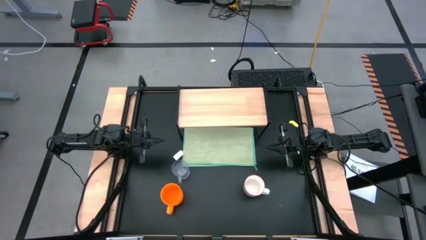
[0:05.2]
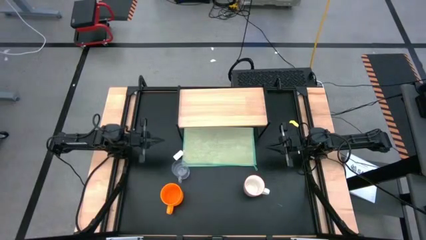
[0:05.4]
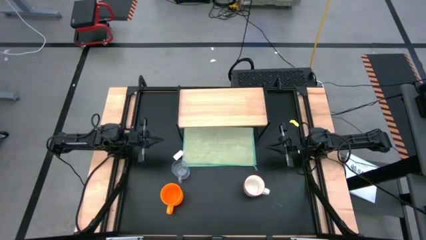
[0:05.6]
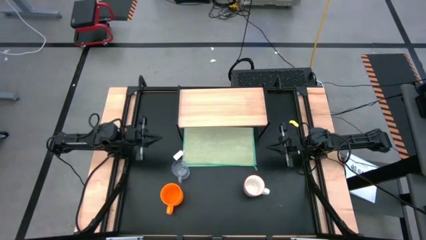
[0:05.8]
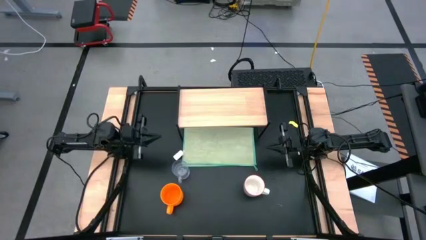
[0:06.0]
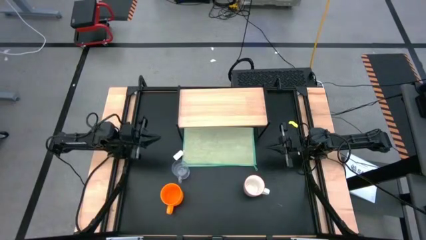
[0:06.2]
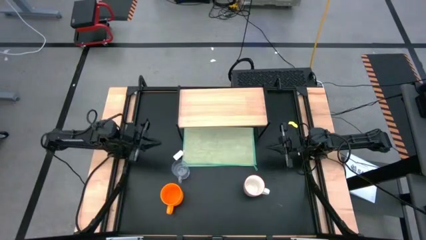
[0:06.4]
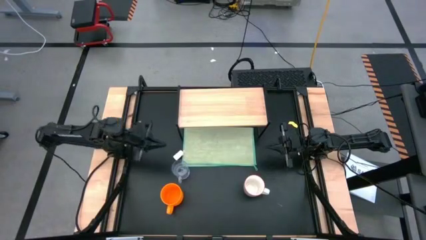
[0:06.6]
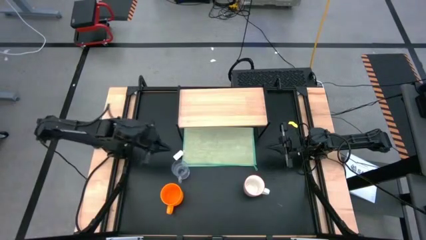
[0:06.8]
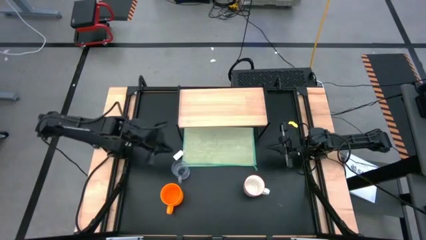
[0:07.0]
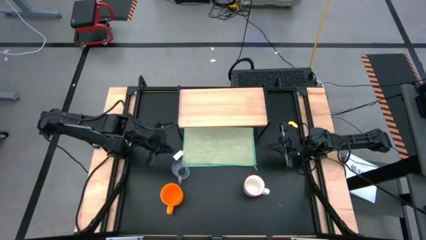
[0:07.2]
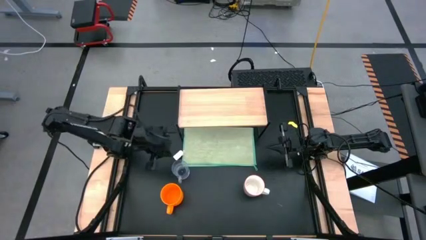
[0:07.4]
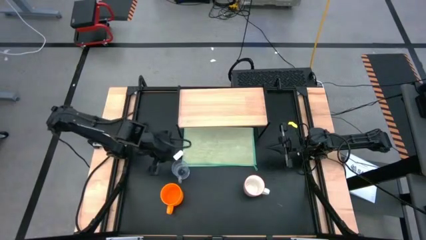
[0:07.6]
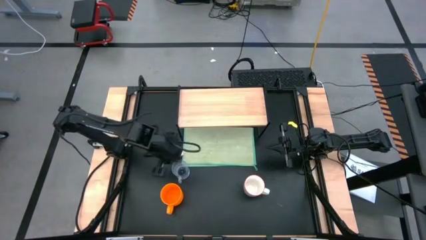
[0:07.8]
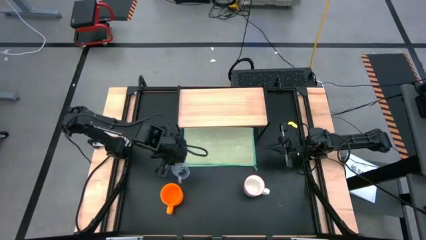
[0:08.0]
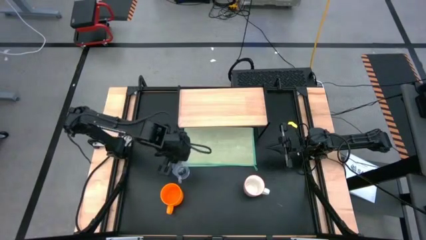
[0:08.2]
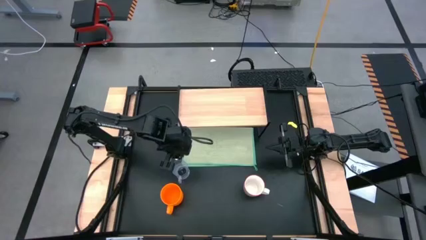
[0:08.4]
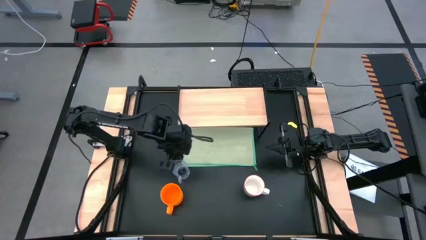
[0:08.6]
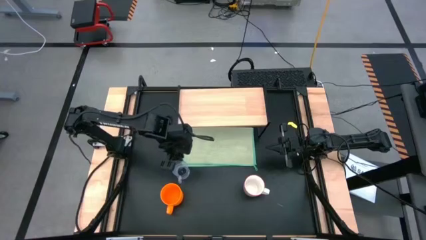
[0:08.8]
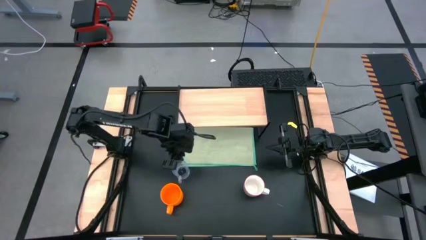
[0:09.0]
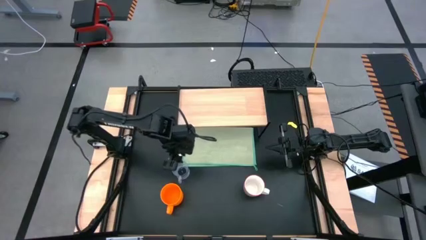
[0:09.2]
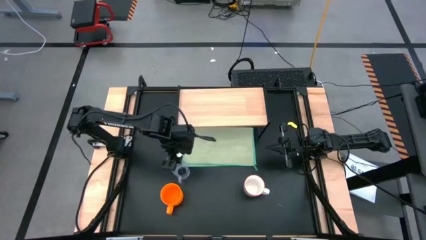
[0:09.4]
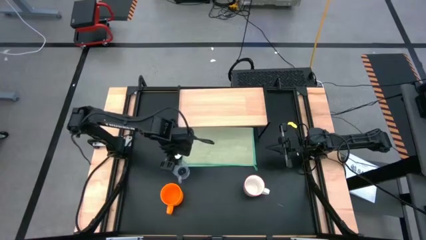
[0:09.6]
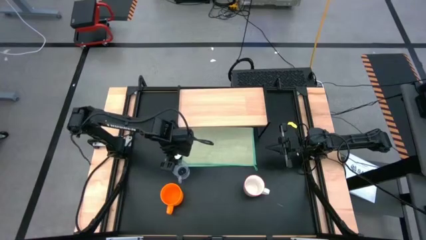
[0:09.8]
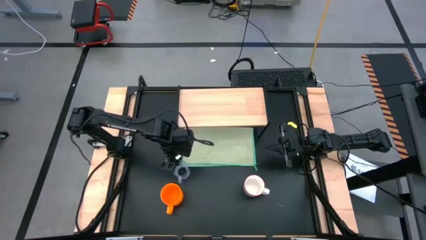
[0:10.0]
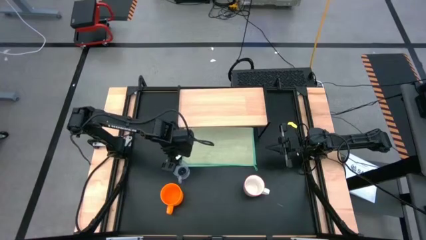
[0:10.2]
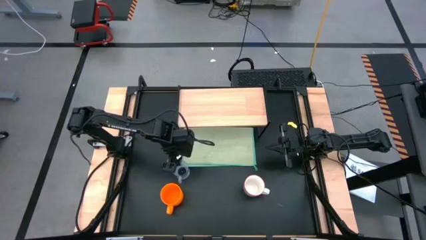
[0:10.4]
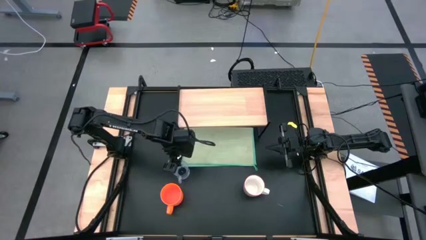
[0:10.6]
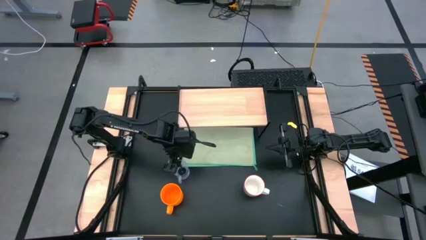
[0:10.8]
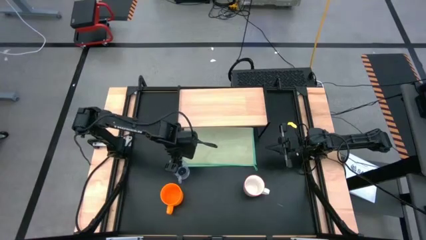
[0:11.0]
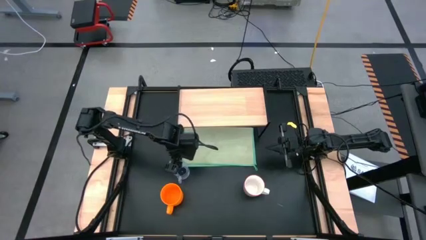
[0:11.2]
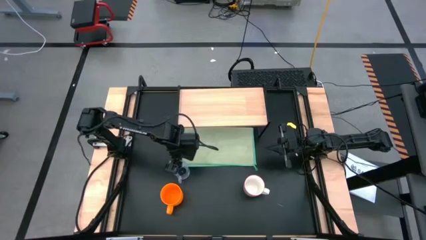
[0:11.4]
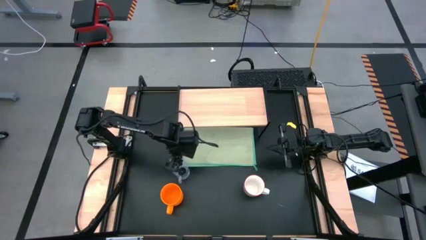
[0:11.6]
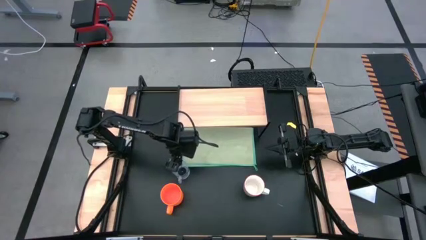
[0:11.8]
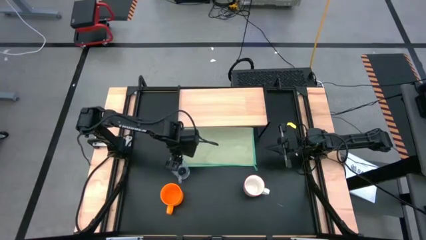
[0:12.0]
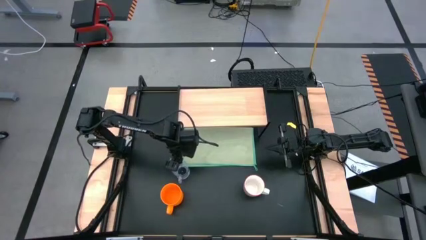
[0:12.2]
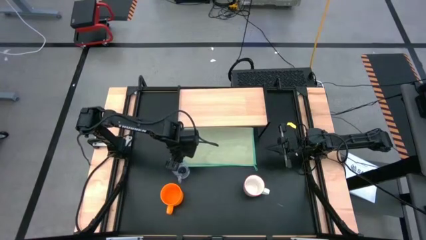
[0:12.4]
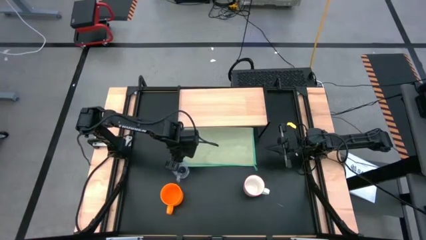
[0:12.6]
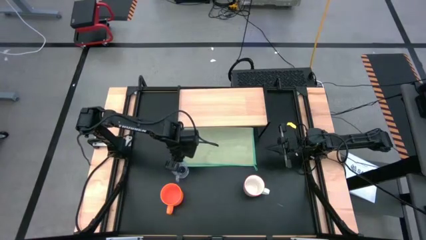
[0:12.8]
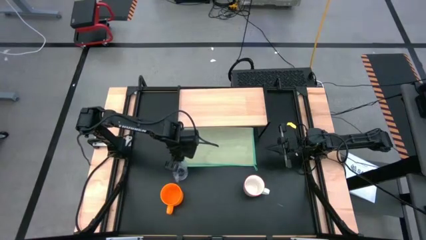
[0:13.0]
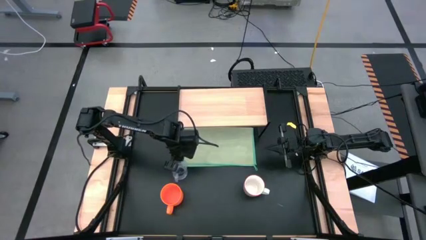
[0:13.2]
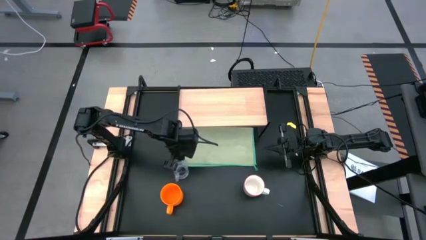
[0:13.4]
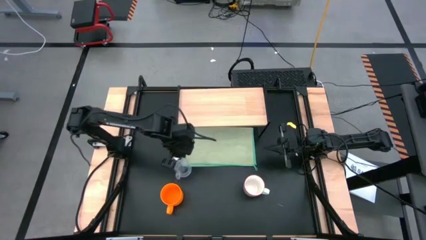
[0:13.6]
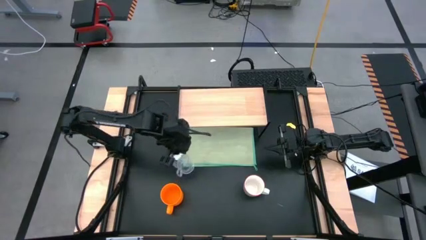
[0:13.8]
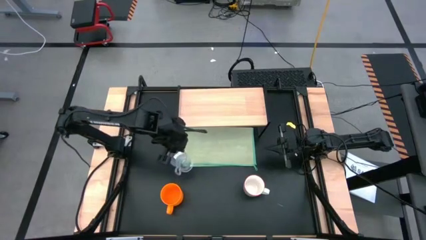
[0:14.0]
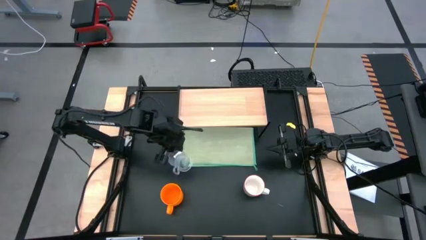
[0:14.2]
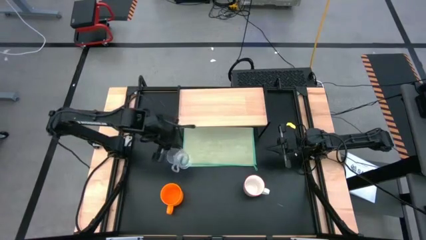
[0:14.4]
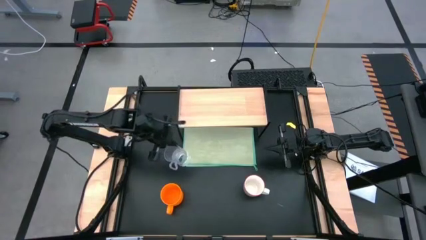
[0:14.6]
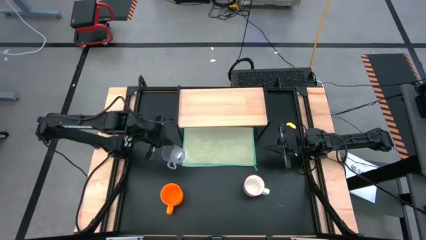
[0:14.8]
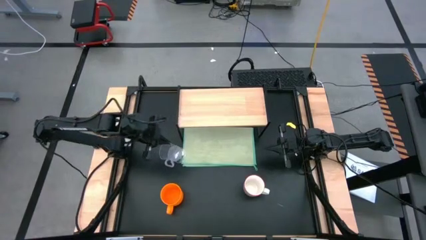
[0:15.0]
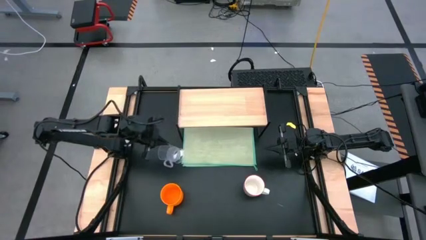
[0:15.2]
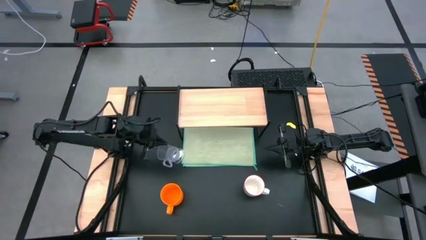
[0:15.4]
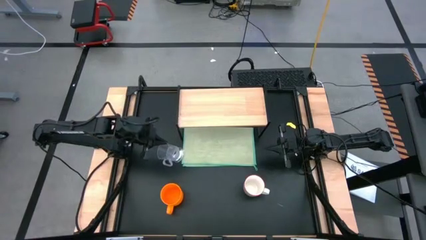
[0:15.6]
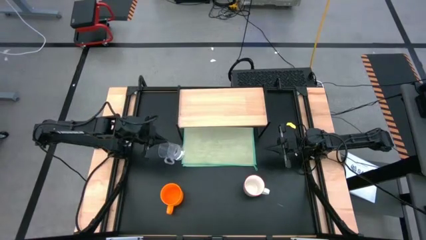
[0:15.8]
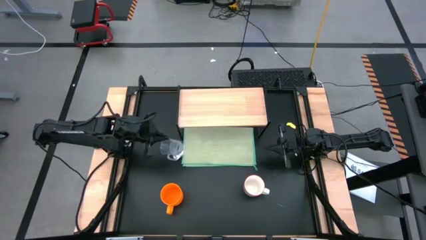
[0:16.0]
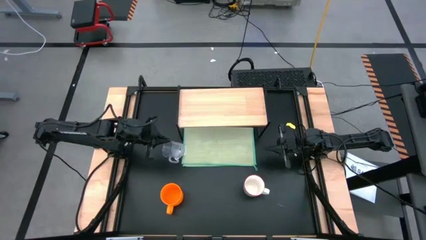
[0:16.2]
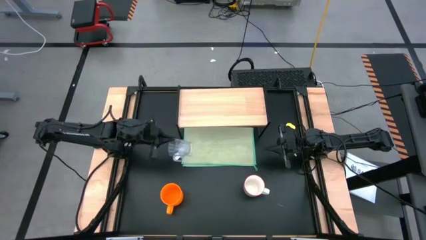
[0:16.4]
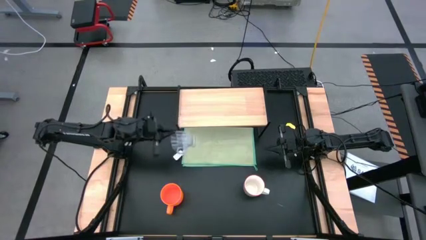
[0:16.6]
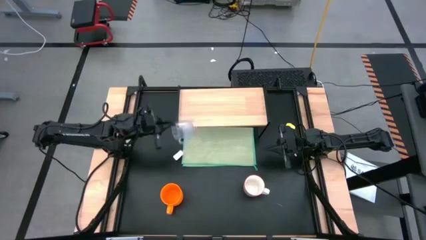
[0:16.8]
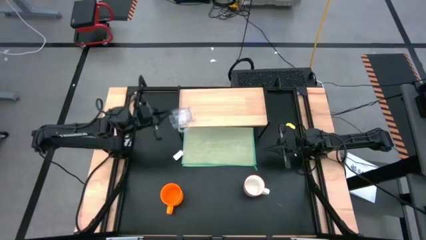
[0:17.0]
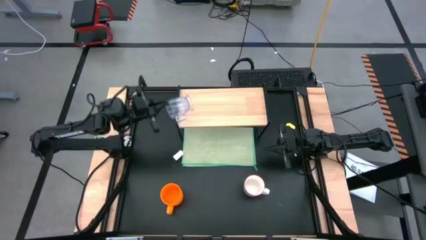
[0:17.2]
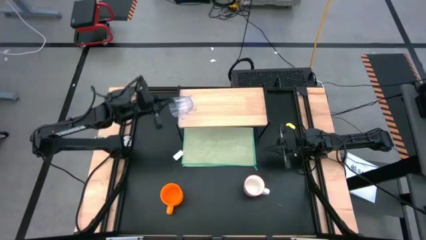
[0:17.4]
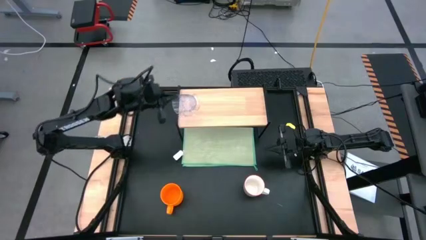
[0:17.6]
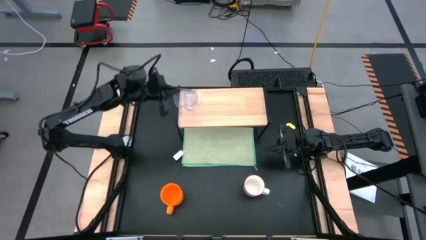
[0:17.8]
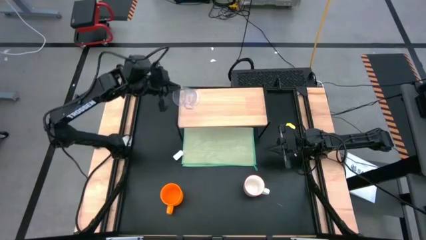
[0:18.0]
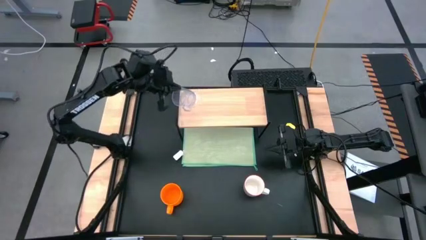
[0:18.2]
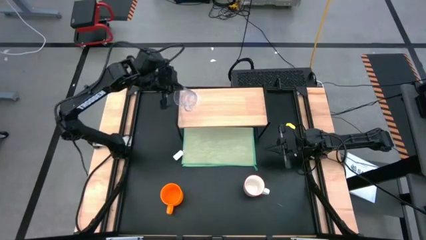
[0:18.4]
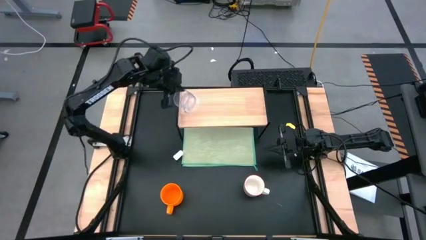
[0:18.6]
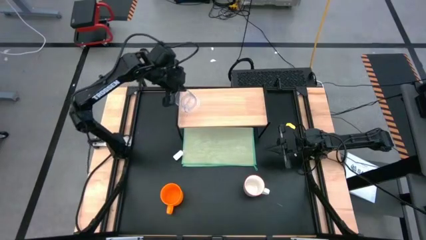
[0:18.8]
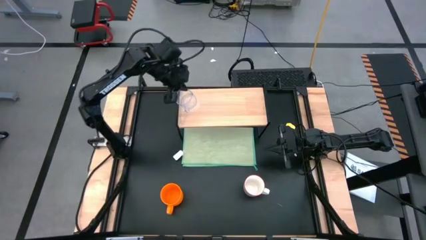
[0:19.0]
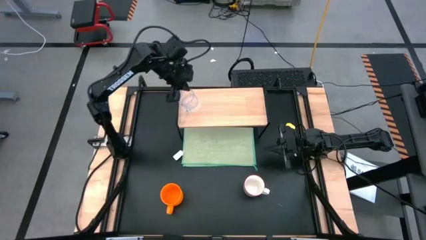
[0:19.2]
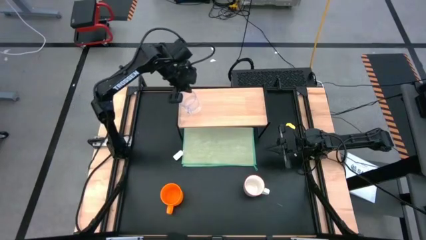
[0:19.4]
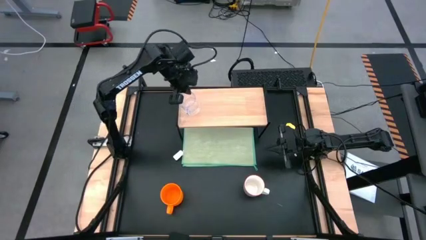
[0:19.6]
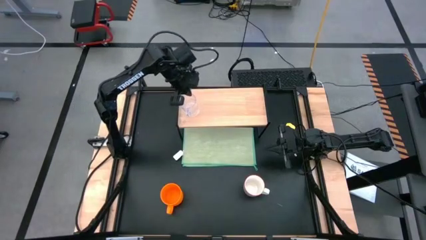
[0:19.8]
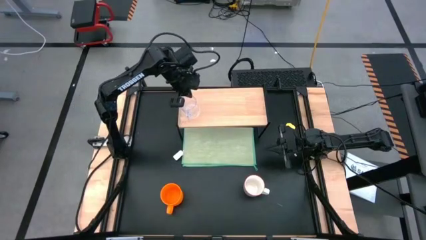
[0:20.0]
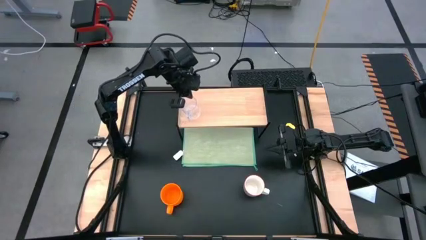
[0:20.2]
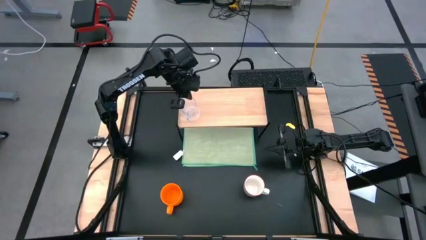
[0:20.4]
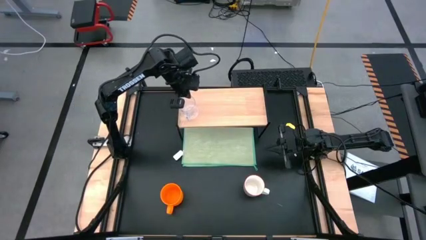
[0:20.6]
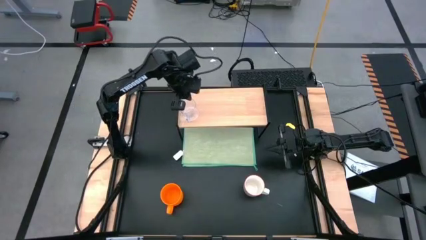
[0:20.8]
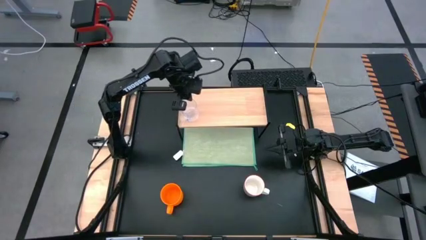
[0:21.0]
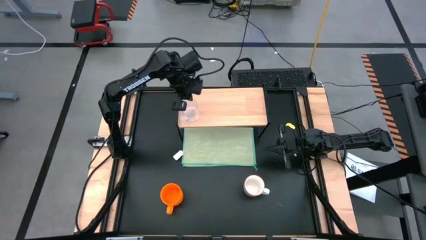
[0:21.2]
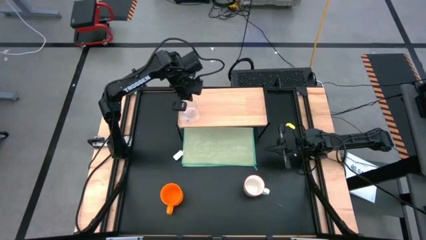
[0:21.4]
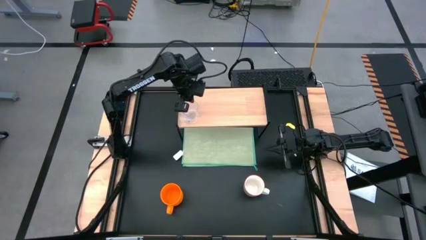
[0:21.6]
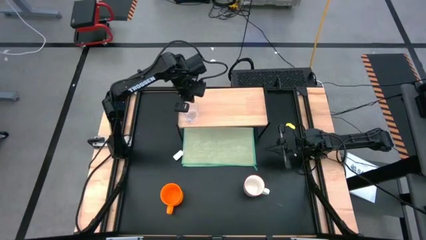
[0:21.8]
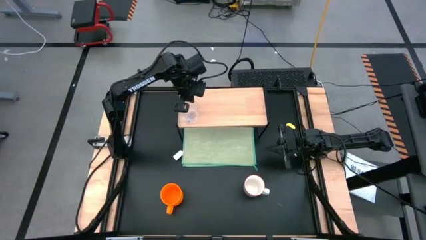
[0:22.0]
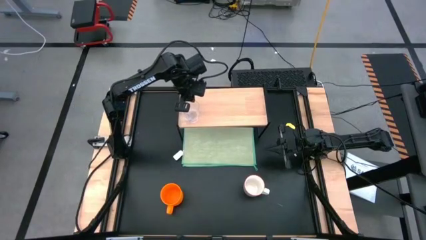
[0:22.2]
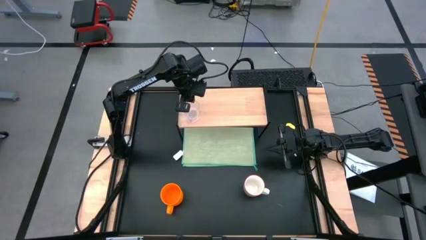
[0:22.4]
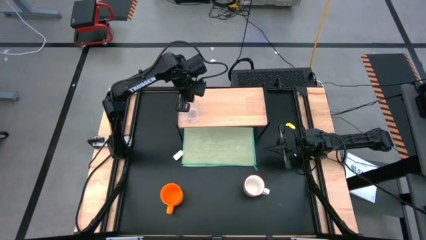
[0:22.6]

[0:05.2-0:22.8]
Task: Stack small to large cups/mugs on shelf
Put the transparent mug on the shelf
